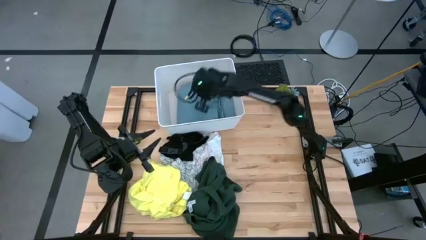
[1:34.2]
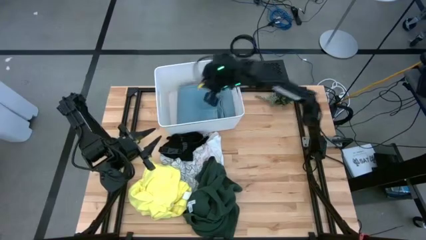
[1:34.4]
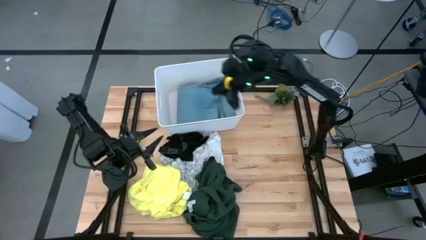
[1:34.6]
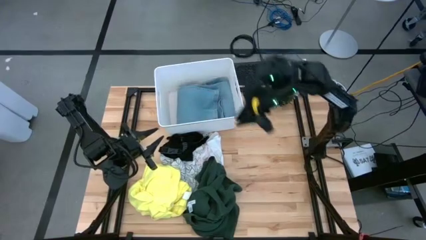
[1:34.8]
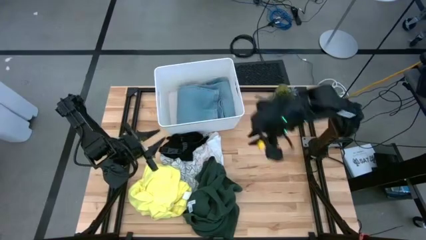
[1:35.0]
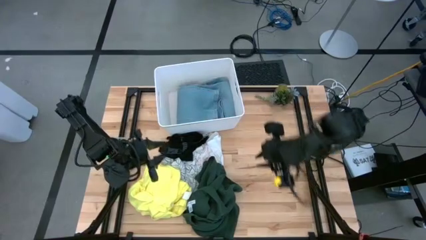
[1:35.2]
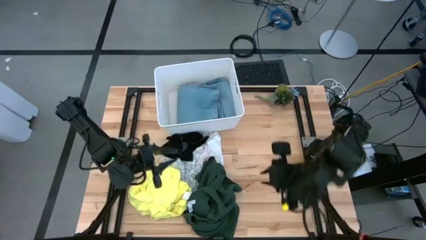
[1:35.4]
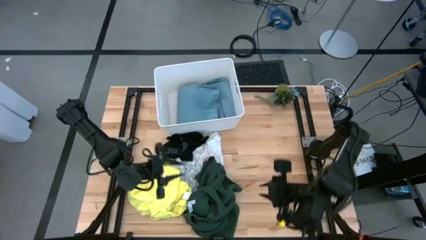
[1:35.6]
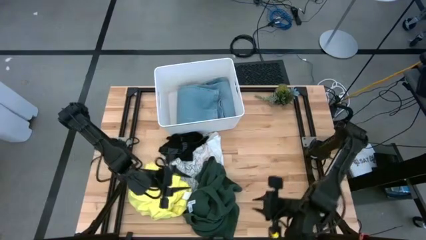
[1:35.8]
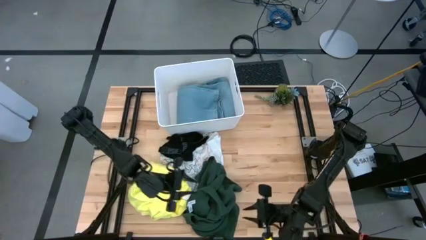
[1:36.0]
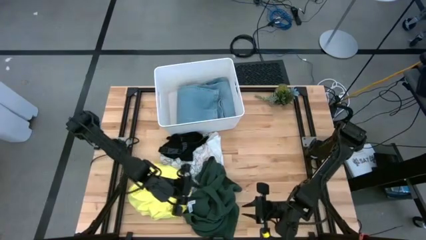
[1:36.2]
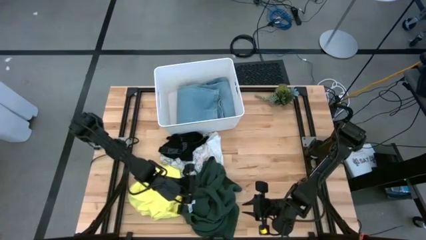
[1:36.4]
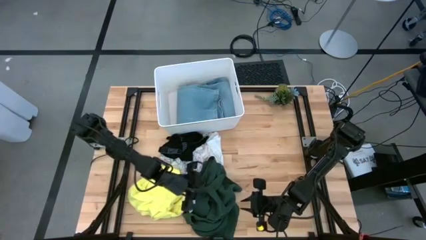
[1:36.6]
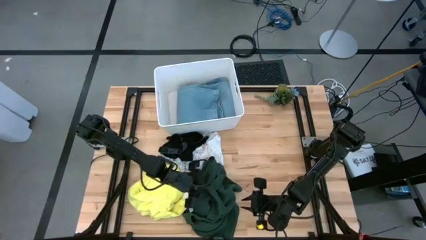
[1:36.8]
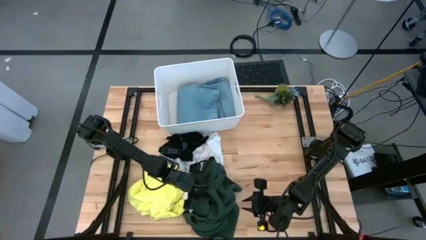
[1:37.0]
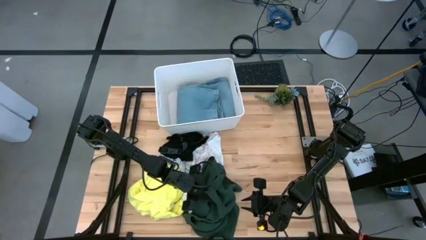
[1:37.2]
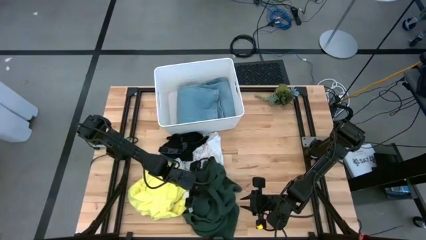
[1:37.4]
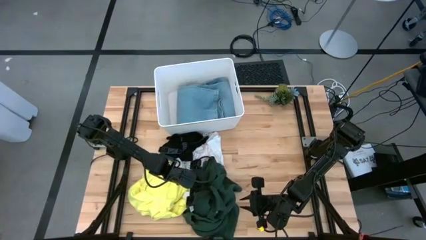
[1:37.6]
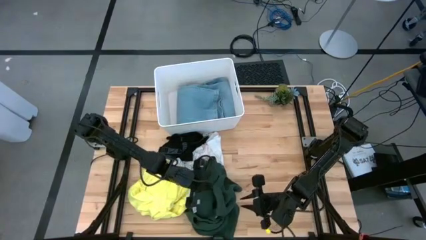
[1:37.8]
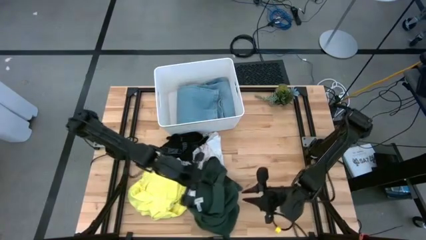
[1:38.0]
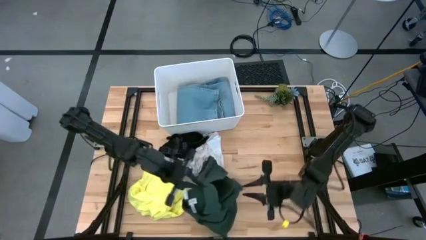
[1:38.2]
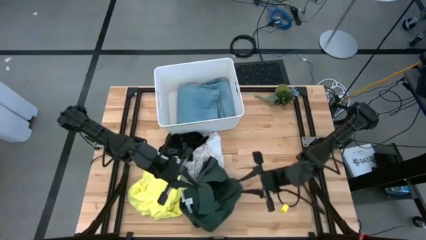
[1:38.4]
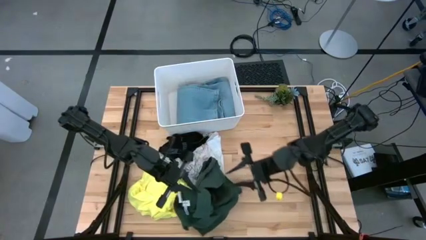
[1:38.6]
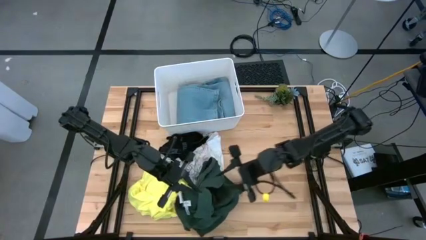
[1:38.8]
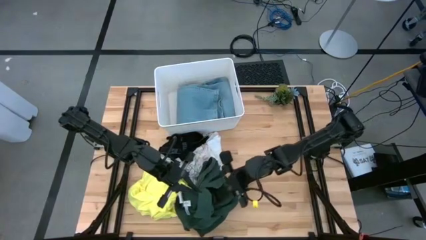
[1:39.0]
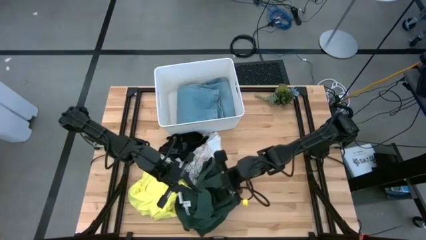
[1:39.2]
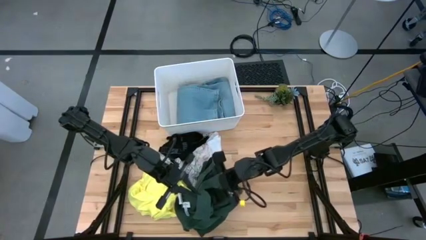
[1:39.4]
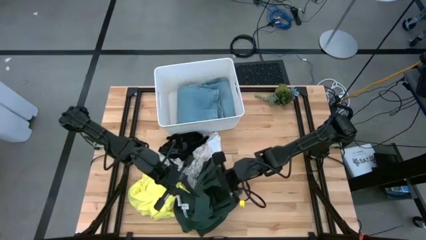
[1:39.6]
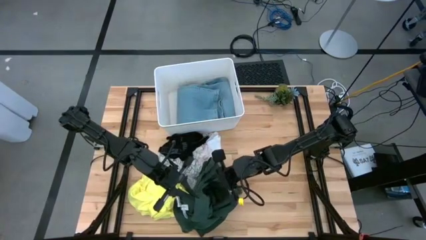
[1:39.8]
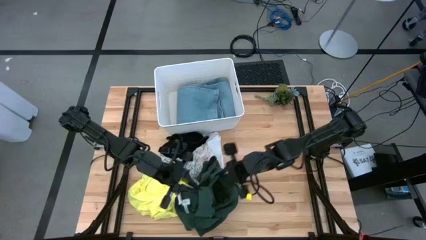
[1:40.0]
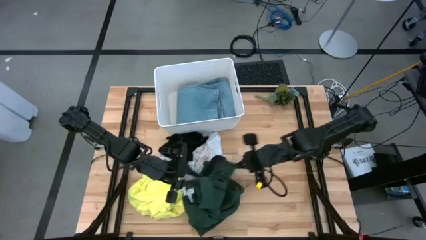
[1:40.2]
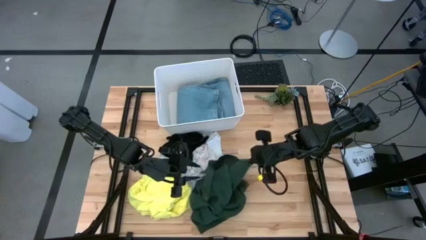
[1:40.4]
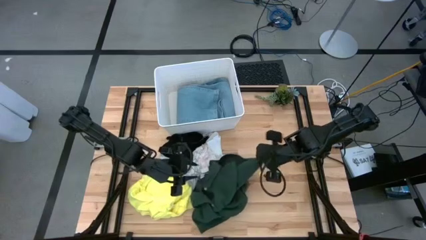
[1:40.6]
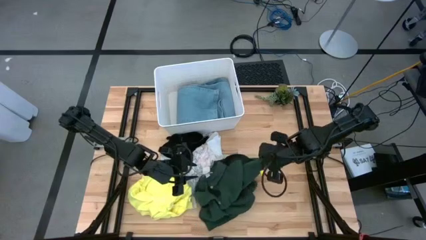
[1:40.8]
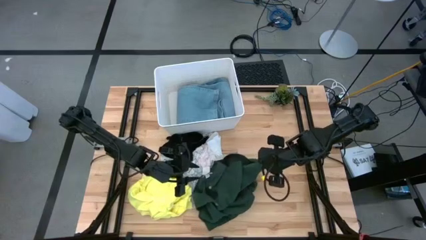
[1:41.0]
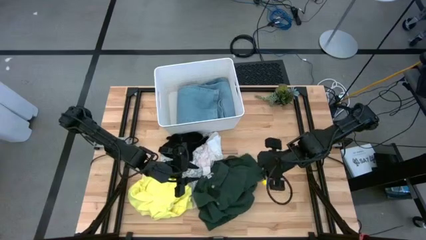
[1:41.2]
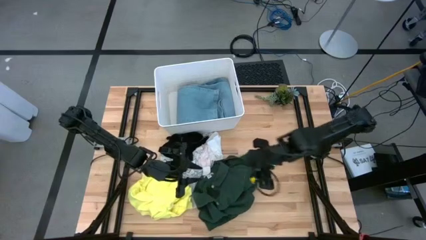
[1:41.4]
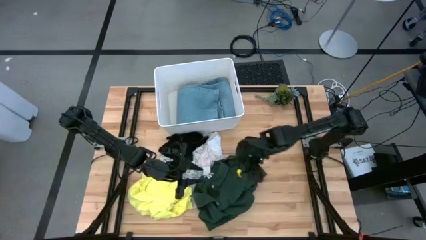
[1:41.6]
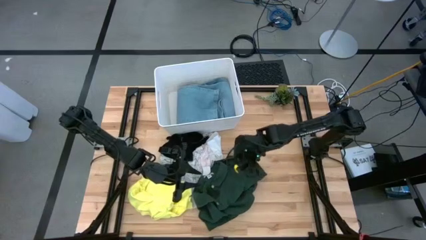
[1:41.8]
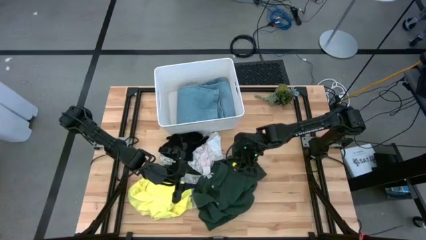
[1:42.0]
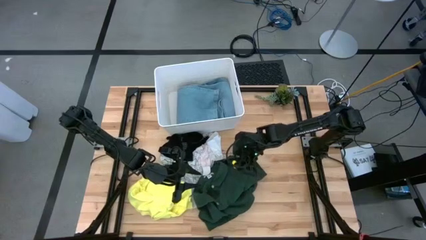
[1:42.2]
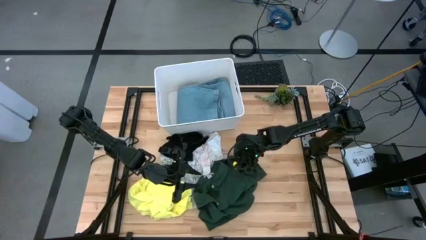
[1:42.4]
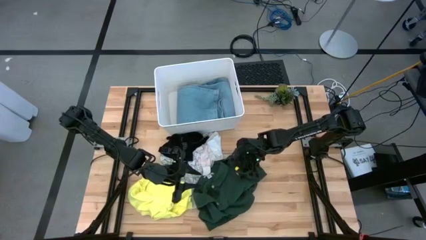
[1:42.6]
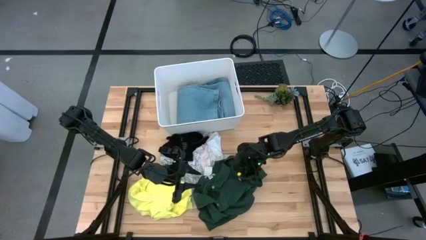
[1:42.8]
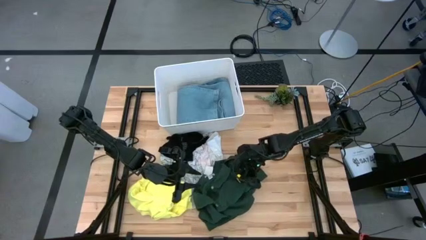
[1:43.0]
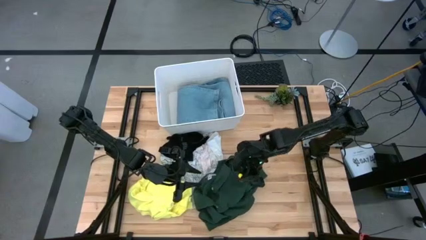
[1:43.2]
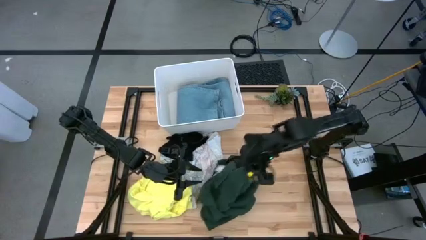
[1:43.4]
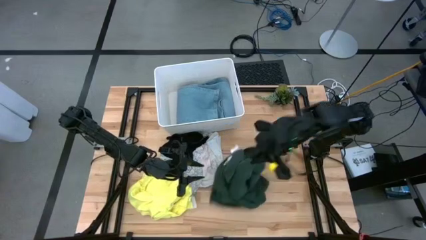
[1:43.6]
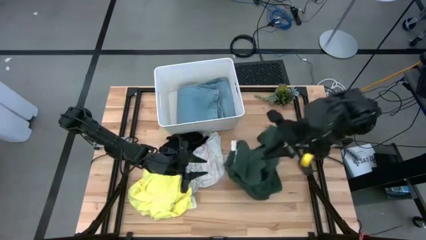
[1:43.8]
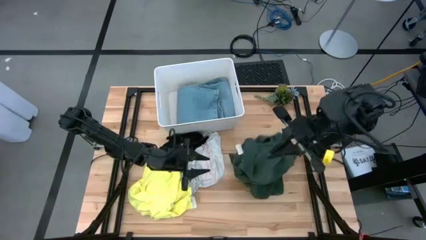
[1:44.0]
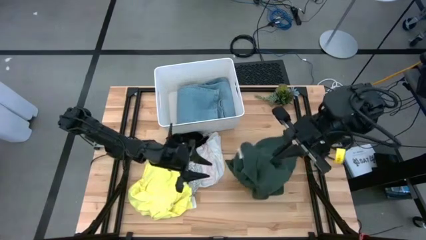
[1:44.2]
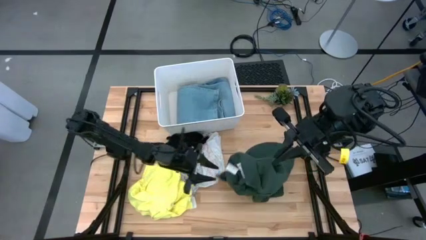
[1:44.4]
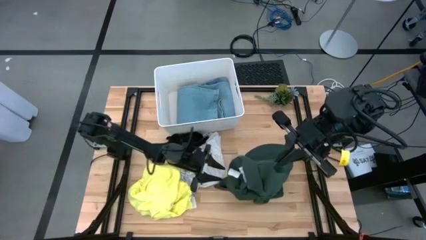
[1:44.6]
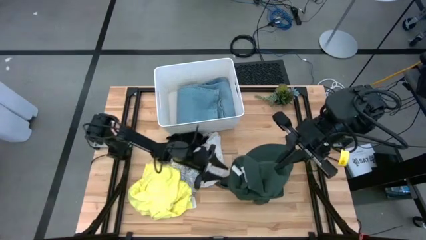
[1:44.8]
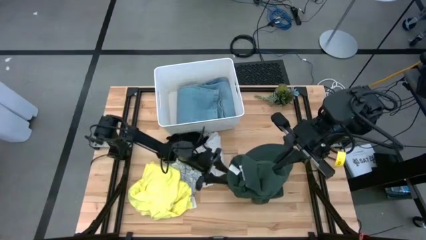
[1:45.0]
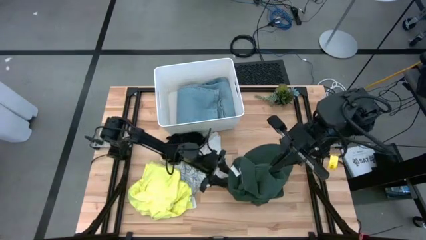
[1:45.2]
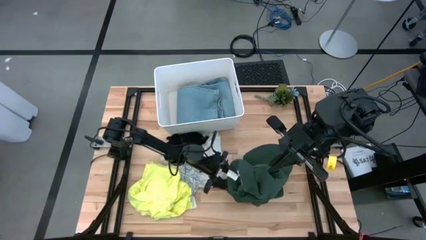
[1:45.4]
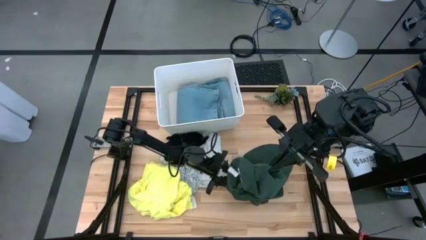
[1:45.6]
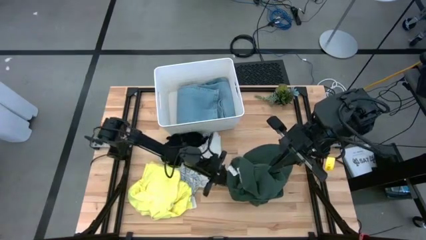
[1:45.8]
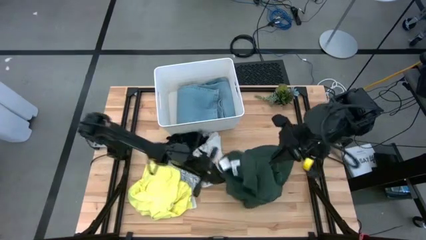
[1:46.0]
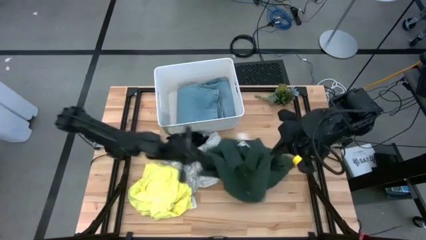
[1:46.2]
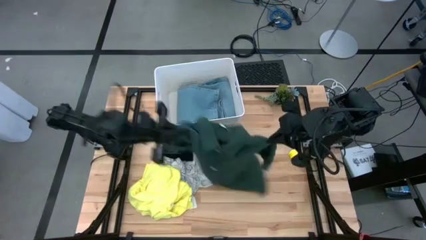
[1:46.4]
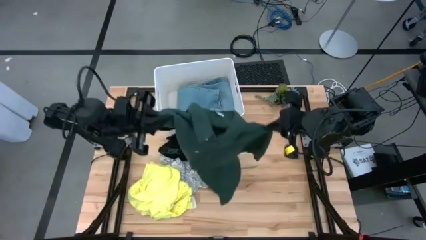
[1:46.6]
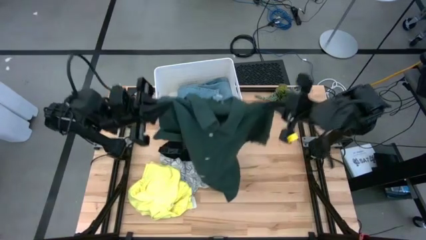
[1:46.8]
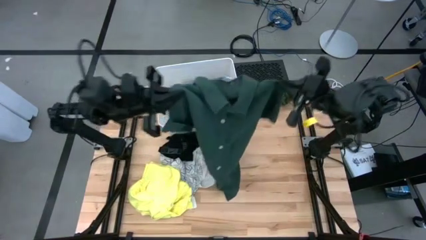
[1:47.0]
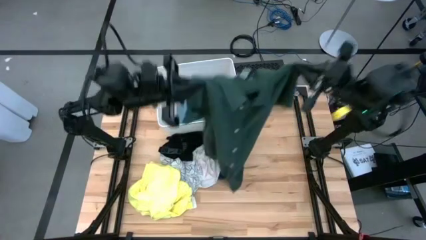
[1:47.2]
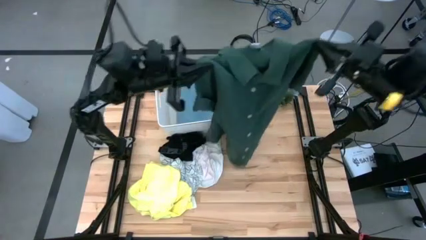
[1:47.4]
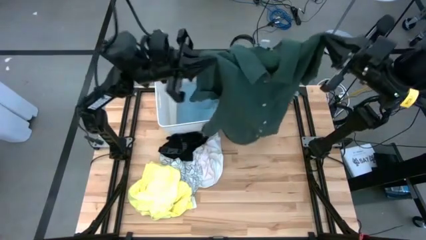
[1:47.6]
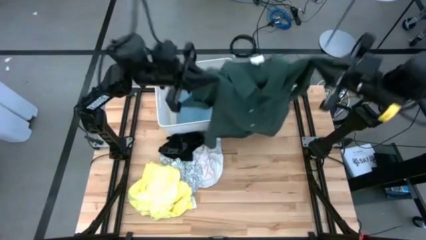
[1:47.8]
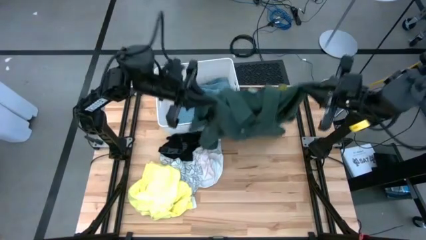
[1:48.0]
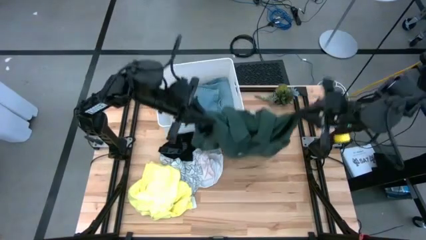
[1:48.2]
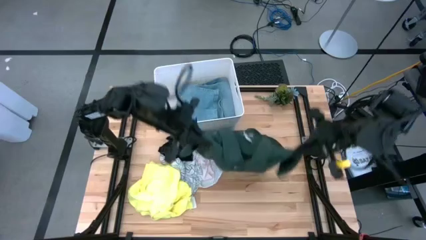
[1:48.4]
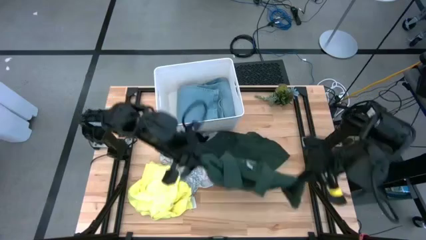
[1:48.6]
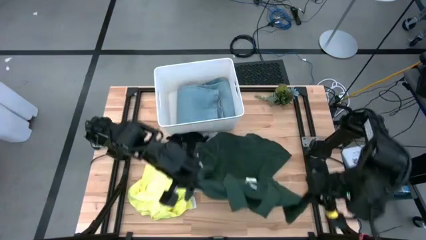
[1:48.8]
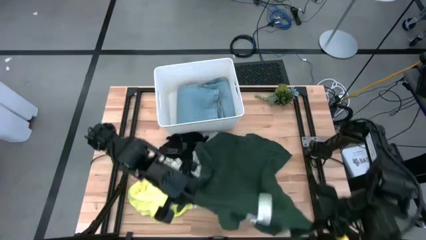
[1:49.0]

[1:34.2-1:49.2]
Task: Fold laundry
Fold the green polo shirt

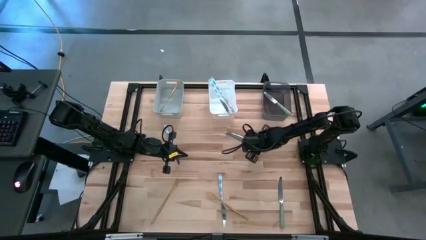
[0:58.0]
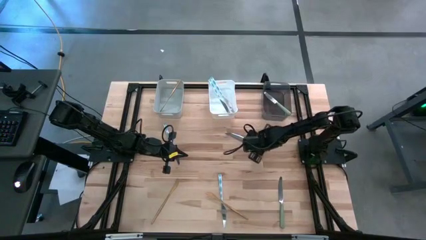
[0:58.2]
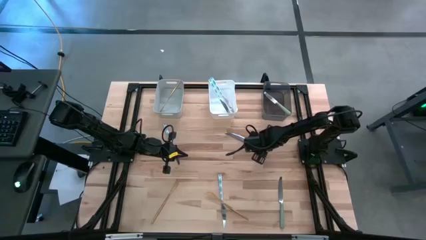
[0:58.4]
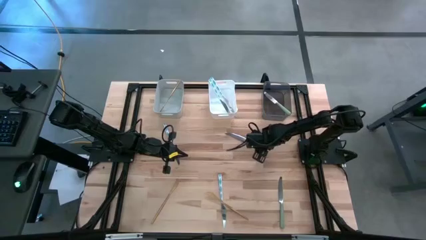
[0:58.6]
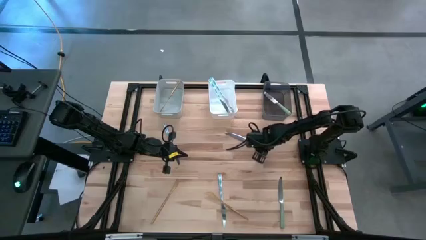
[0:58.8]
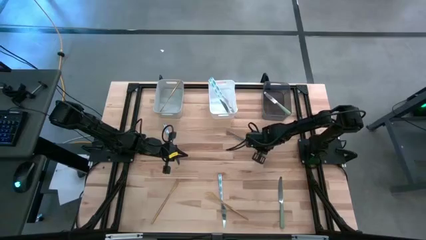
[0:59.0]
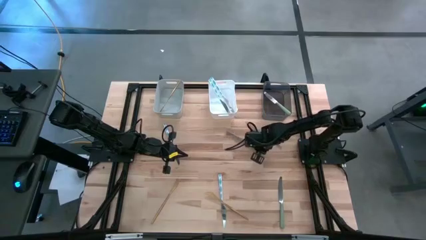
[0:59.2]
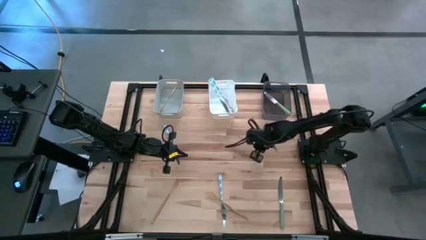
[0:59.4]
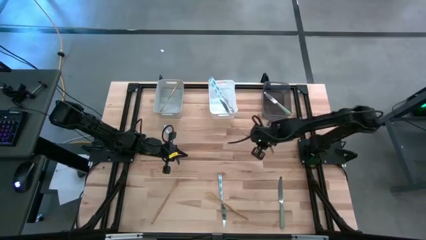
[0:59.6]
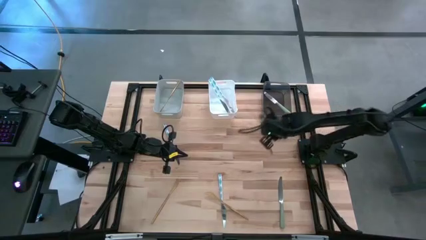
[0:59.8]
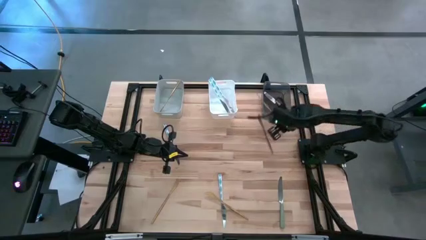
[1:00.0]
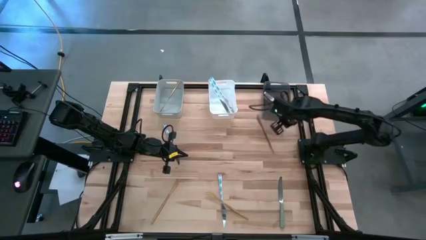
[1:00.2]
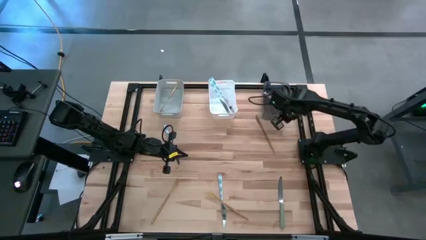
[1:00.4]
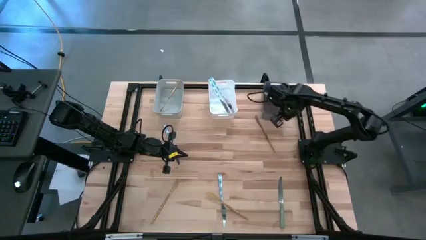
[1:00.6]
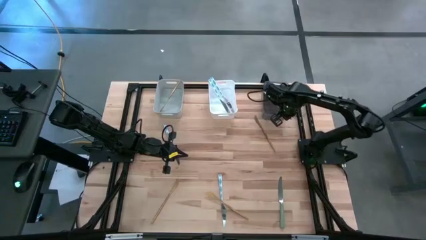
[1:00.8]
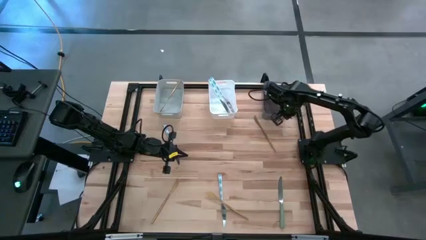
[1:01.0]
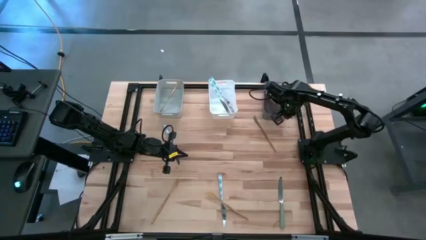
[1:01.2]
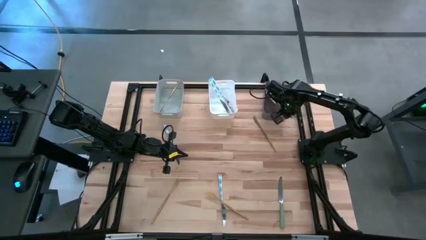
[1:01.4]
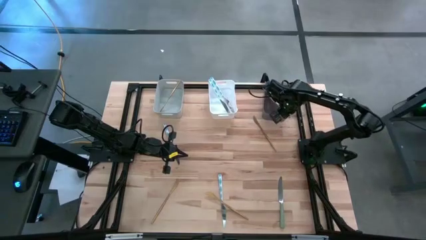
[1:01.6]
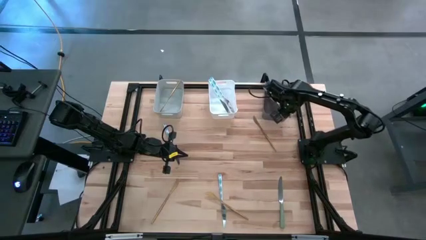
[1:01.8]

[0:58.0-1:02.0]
Task: Sort silverware by color (type)
Put the top green table knife into the black bin
